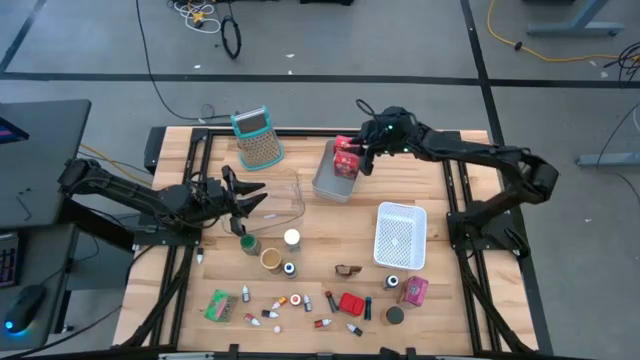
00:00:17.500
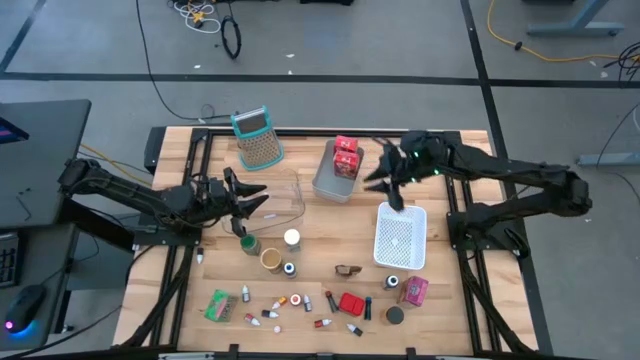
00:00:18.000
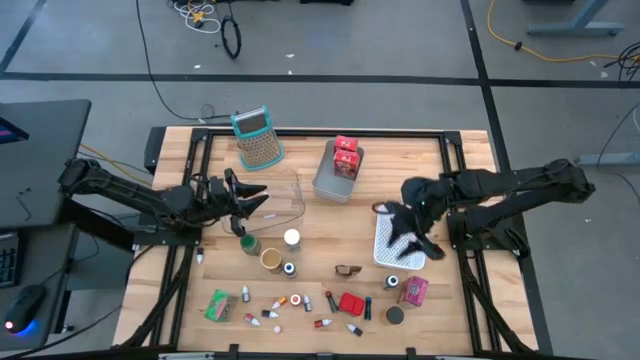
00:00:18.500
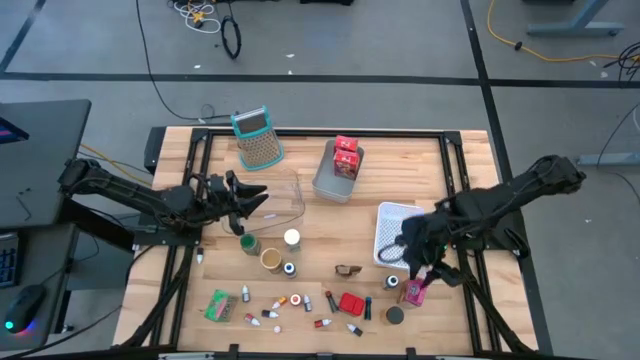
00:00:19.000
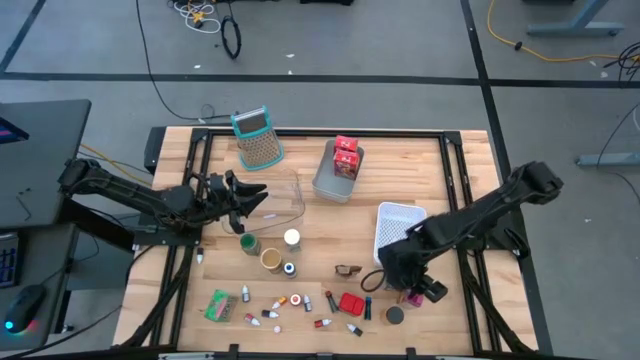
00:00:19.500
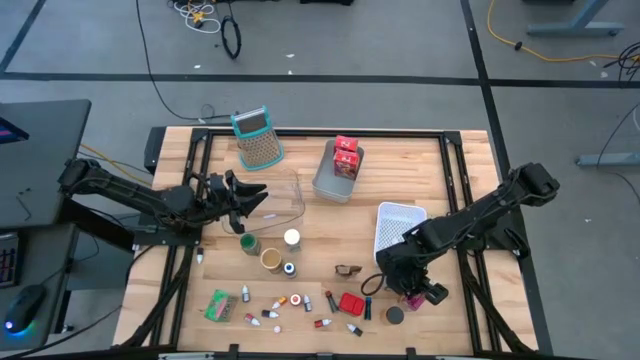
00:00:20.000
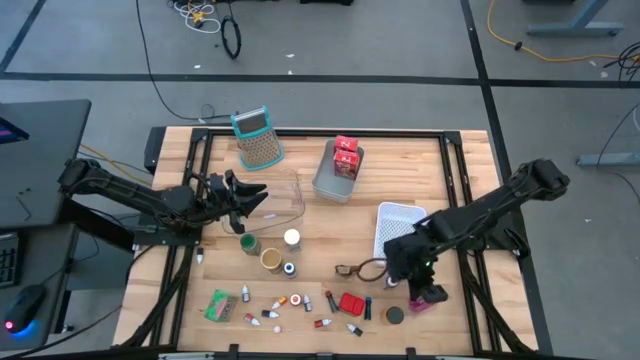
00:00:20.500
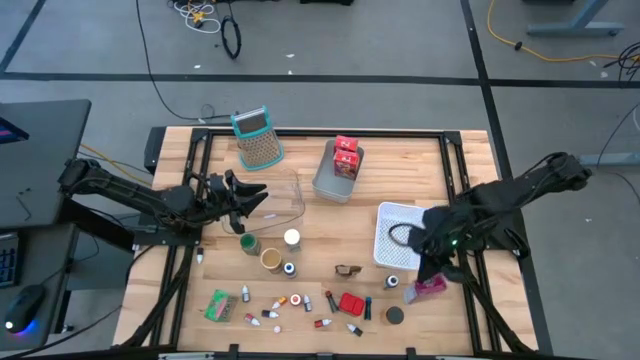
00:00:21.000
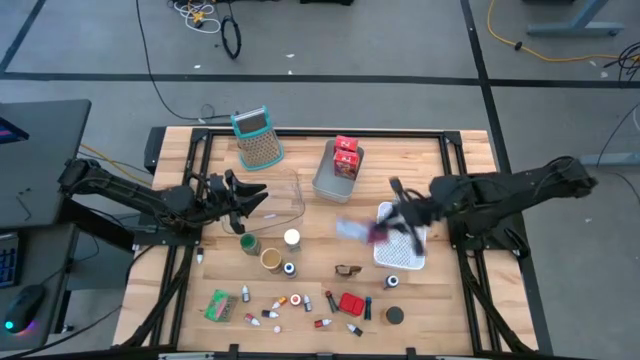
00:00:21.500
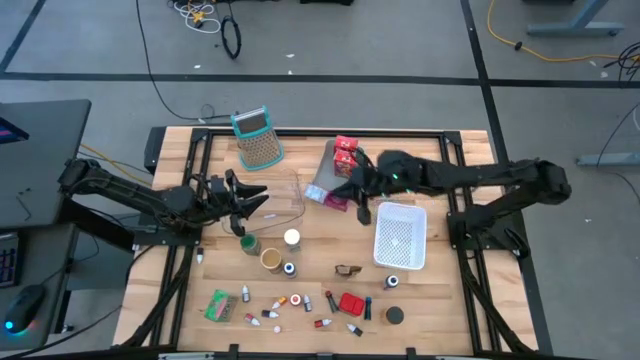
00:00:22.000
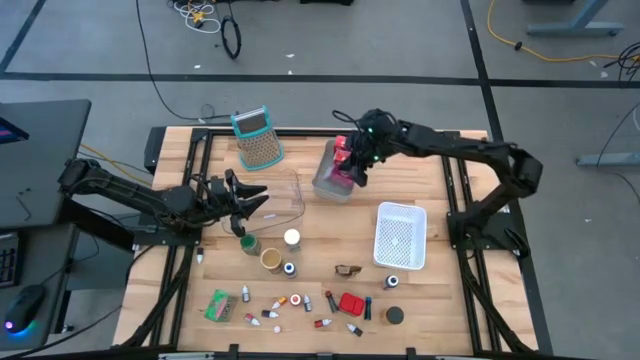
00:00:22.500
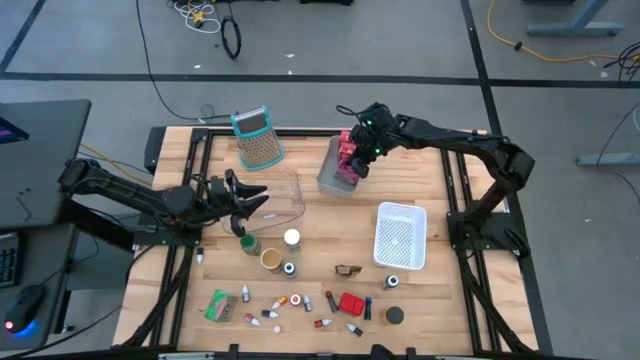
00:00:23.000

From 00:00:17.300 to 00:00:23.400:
Task: Pick & Place Kitchen Items
Put the purple cereal box into the gray bin

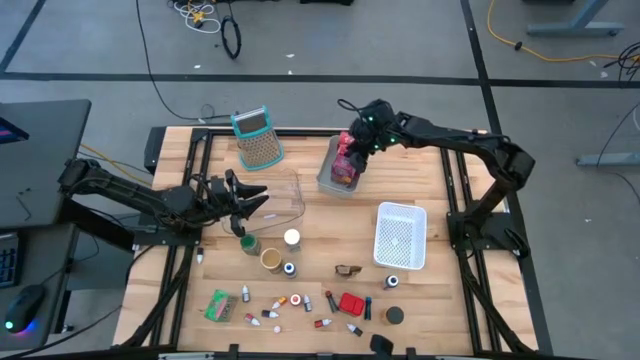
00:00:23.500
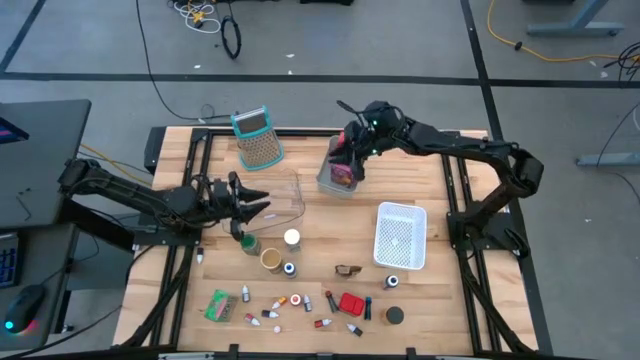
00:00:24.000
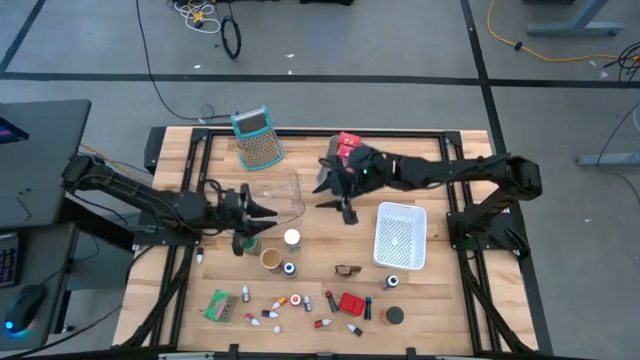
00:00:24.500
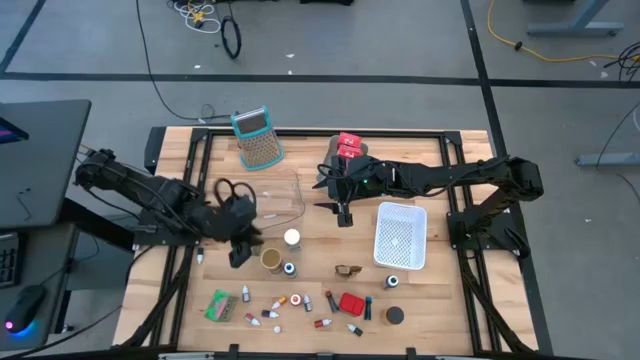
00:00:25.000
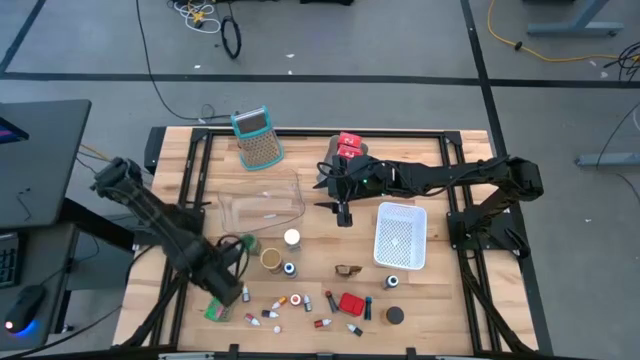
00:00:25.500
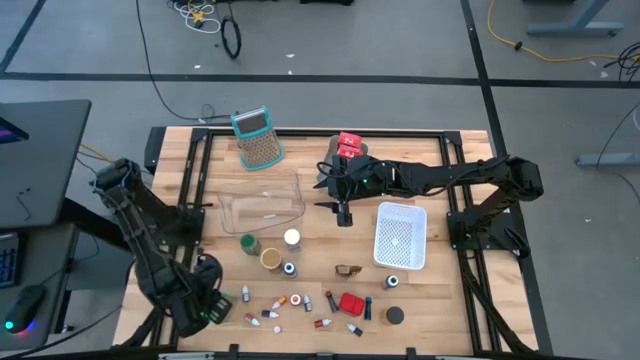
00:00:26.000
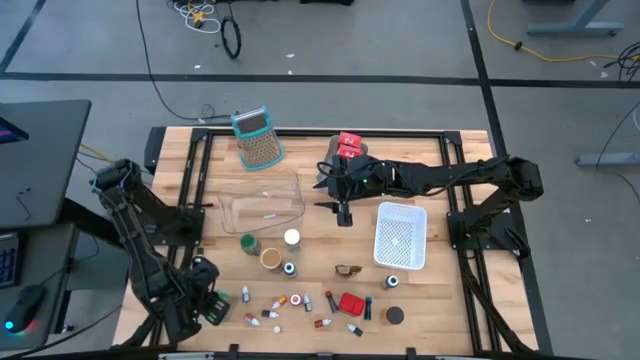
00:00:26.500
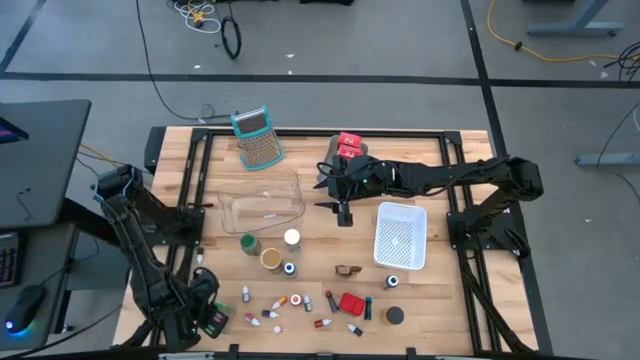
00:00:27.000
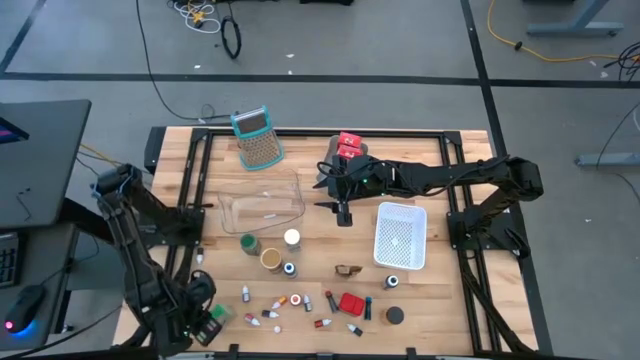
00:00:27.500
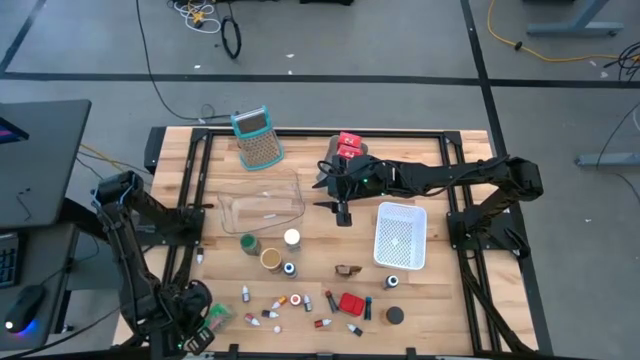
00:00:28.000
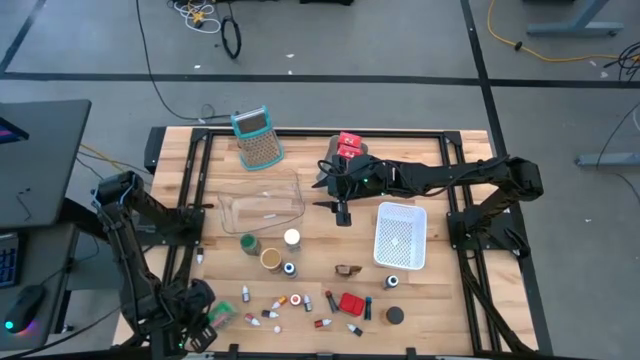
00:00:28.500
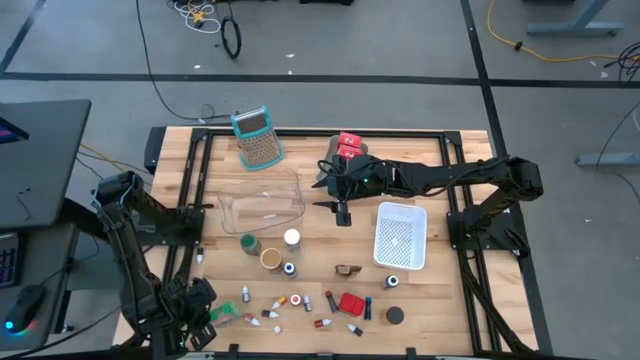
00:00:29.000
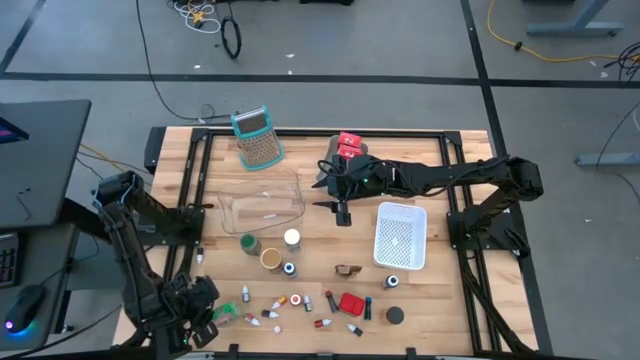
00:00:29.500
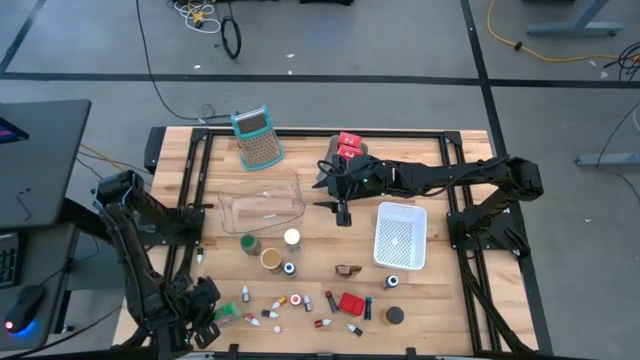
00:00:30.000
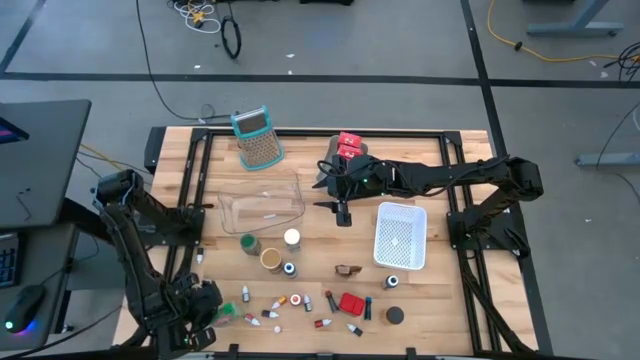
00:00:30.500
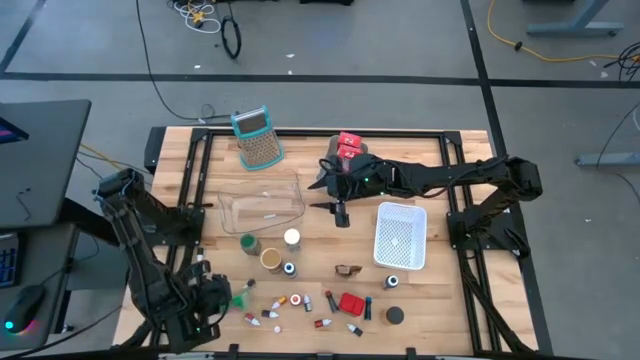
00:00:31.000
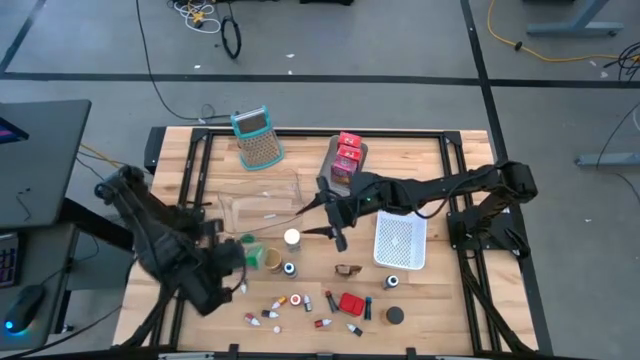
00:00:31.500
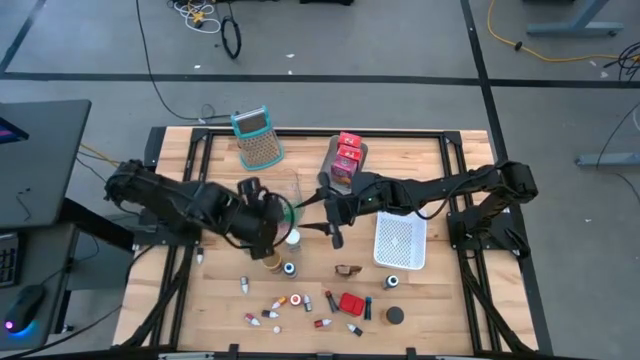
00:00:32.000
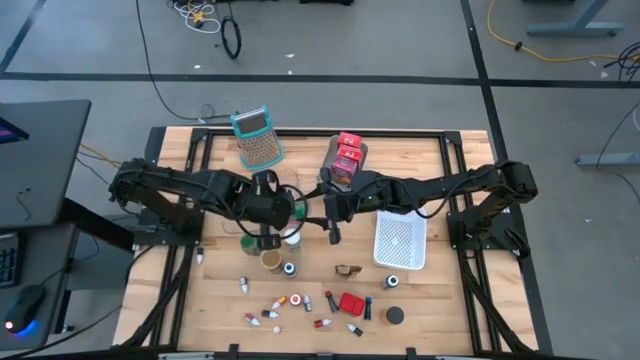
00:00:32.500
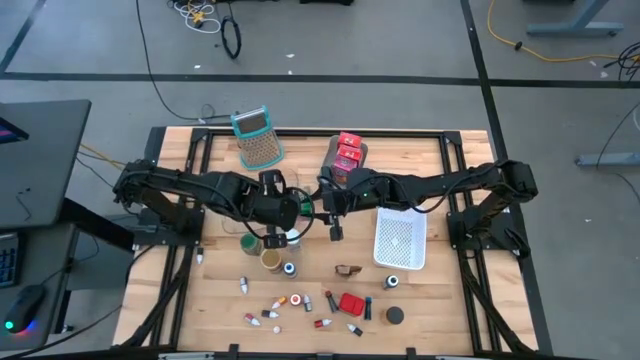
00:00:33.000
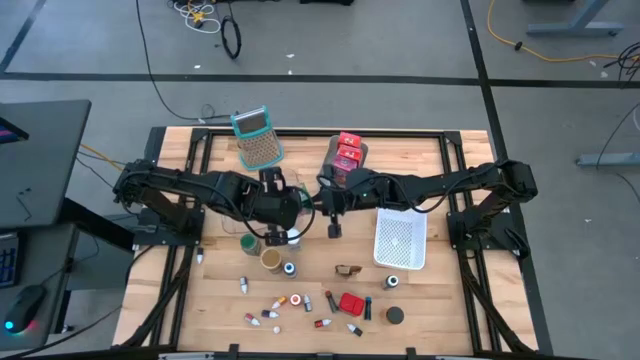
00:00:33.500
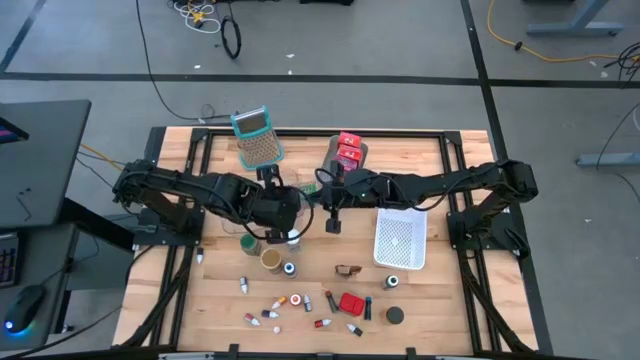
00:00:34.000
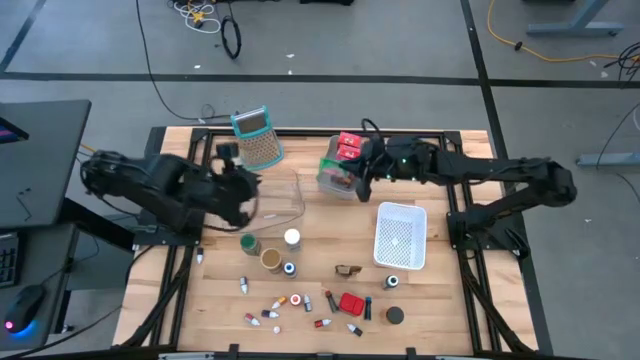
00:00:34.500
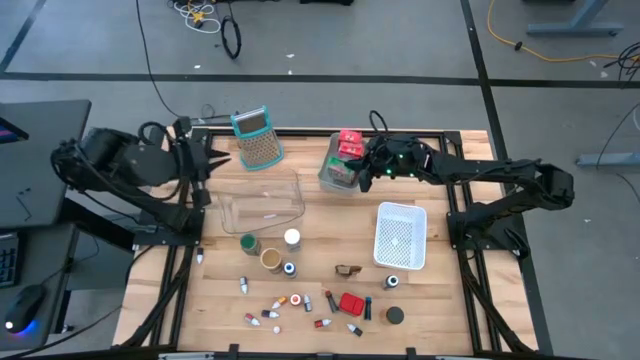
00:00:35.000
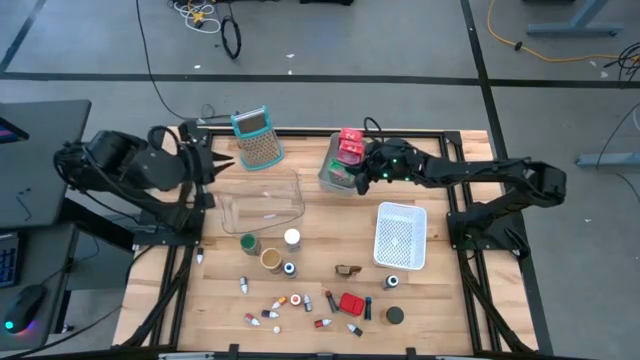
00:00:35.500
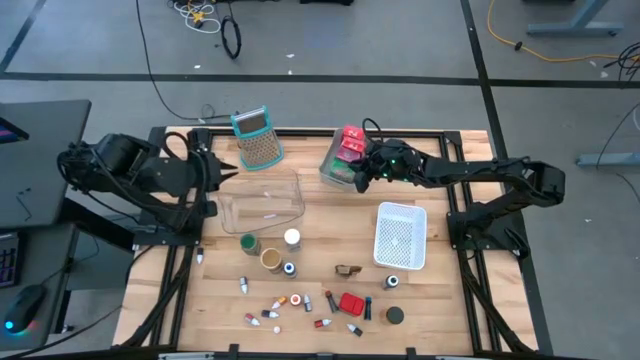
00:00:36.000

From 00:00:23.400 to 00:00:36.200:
Put the green cereal box into the grey bin

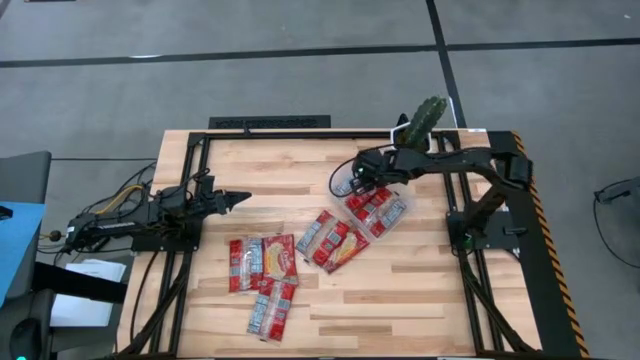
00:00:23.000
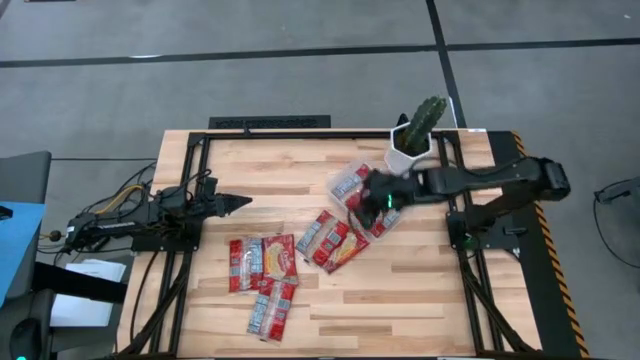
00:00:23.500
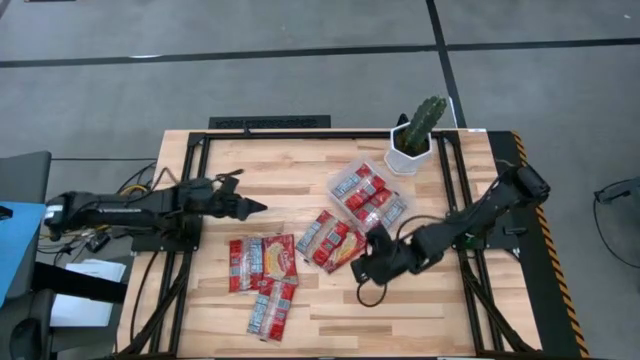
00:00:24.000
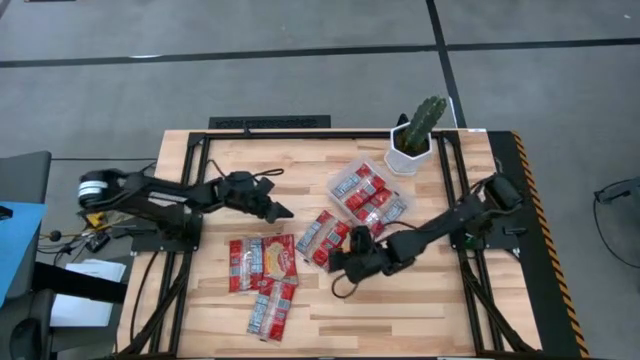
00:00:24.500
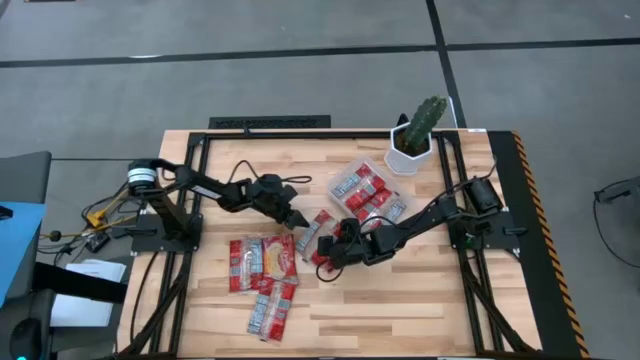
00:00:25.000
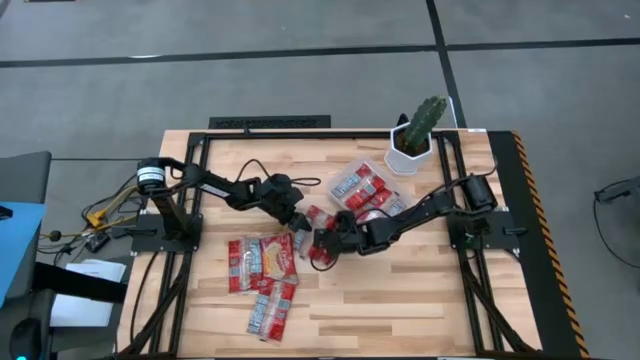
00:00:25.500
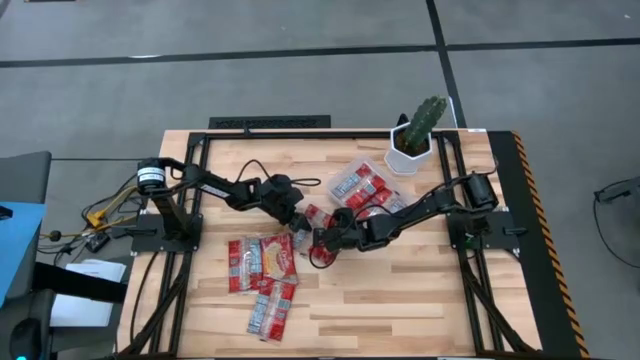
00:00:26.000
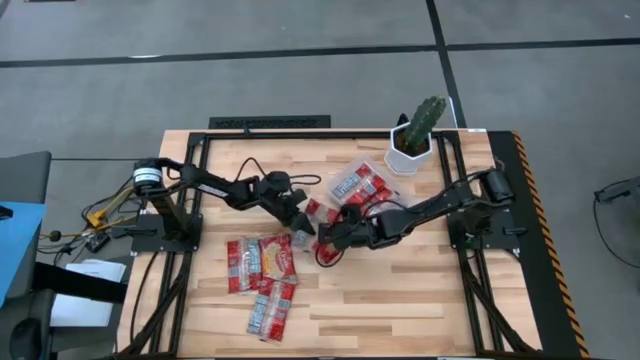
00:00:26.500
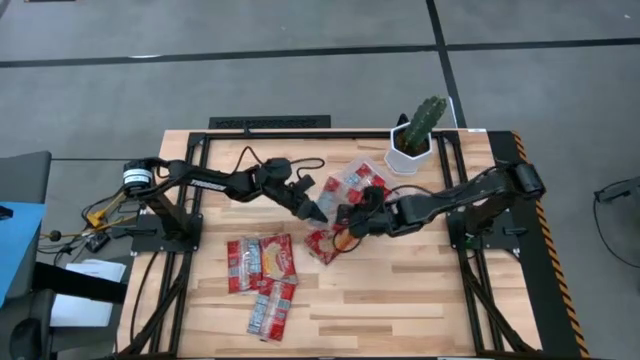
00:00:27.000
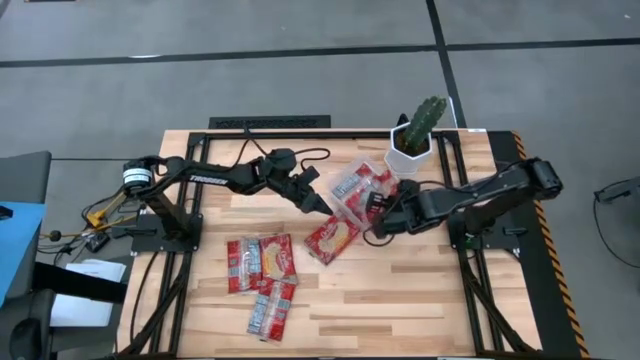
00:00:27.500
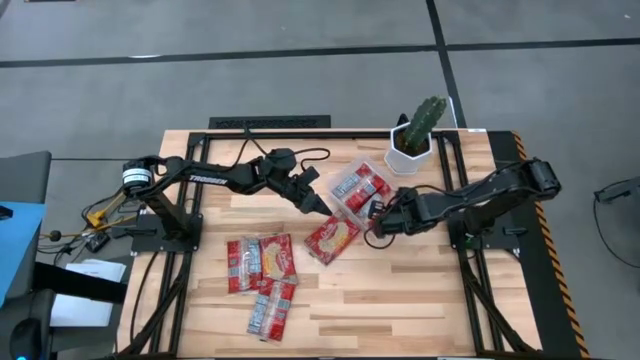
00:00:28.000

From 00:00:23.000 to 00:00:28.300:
Task: Sort popcorn bags into baskets
Put the red popcorn pack into the transparent bin
